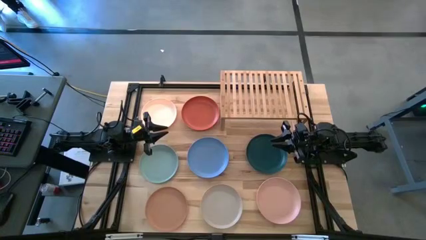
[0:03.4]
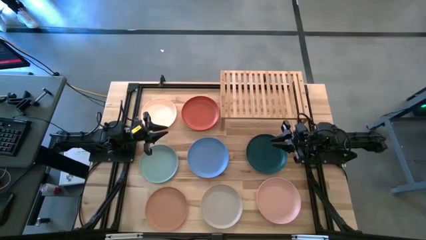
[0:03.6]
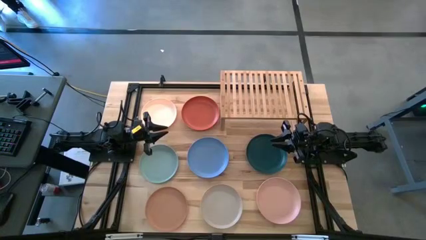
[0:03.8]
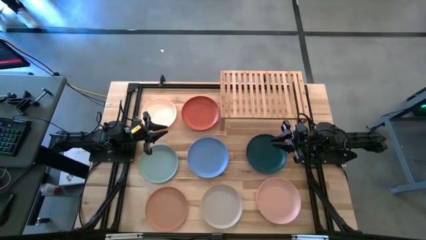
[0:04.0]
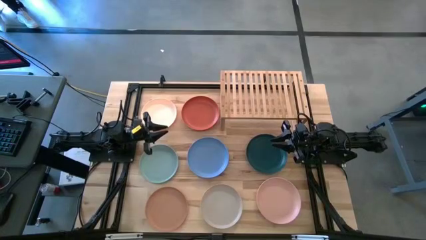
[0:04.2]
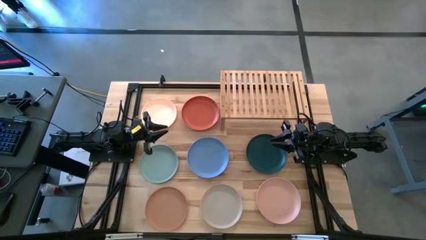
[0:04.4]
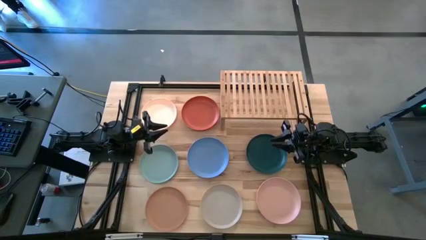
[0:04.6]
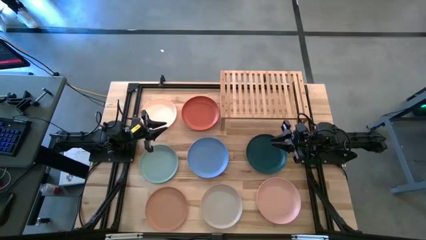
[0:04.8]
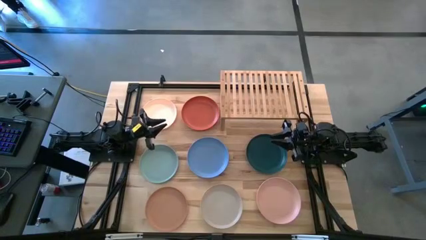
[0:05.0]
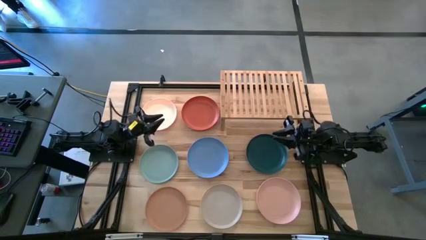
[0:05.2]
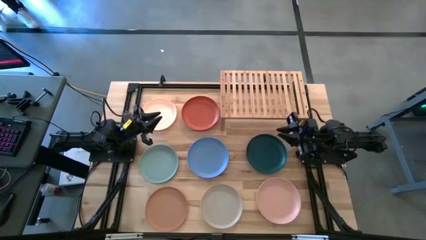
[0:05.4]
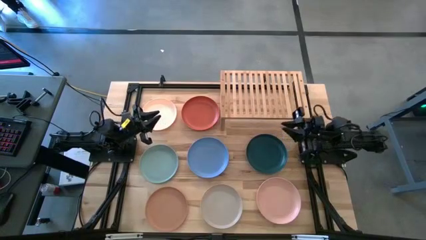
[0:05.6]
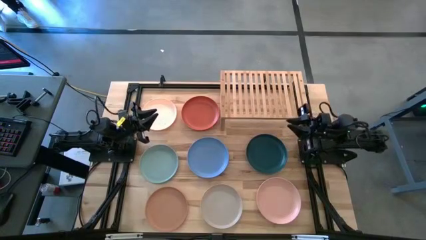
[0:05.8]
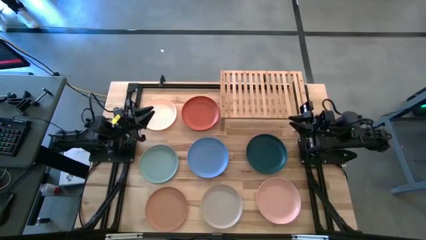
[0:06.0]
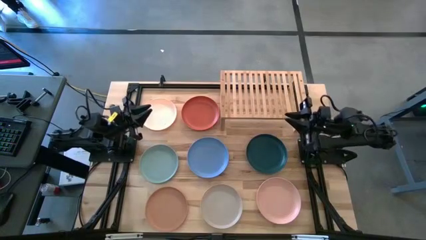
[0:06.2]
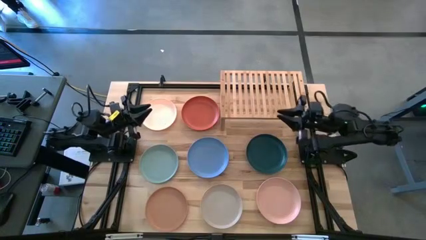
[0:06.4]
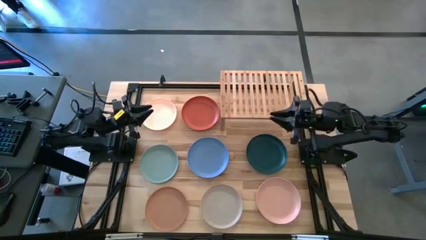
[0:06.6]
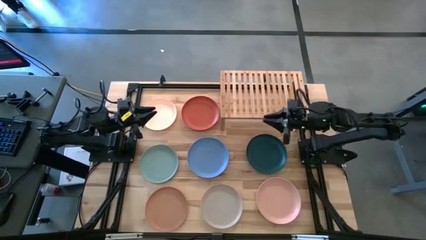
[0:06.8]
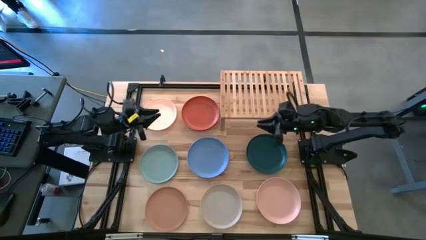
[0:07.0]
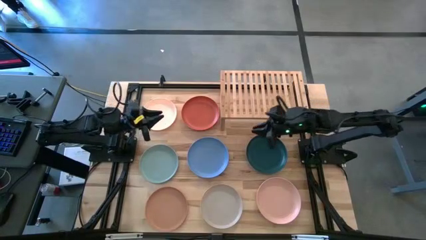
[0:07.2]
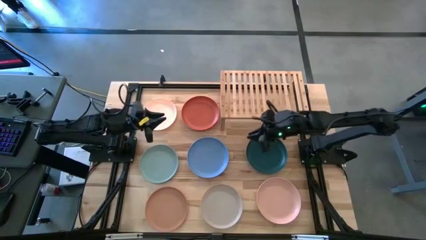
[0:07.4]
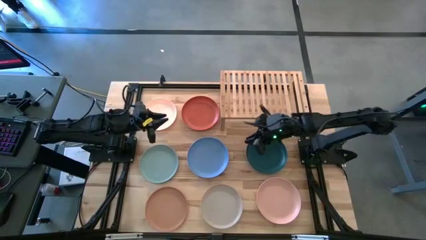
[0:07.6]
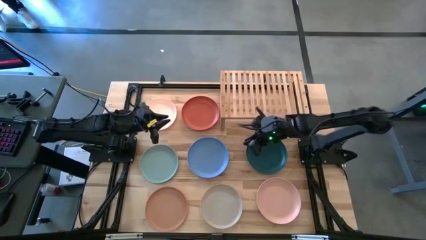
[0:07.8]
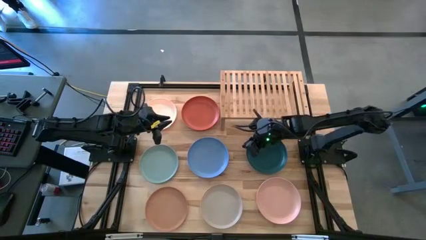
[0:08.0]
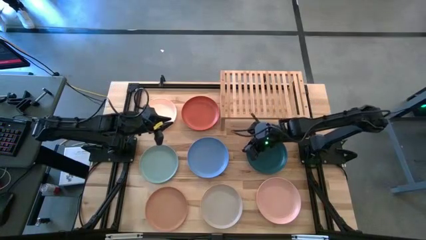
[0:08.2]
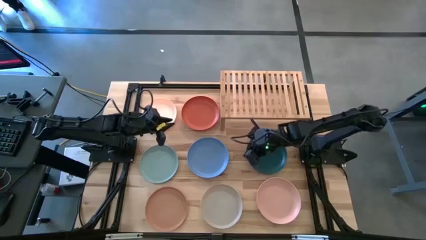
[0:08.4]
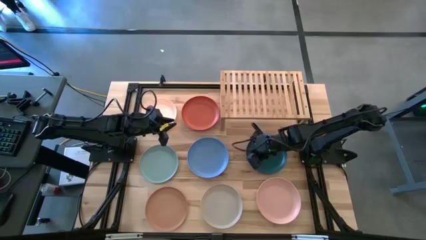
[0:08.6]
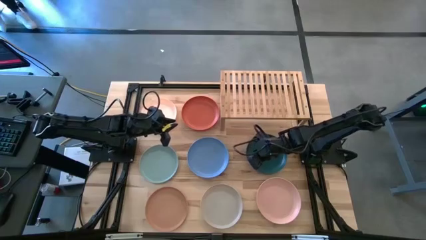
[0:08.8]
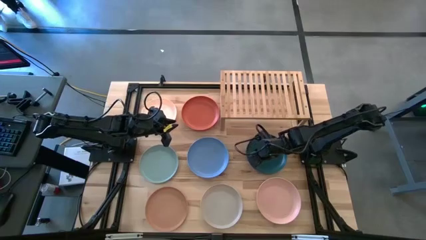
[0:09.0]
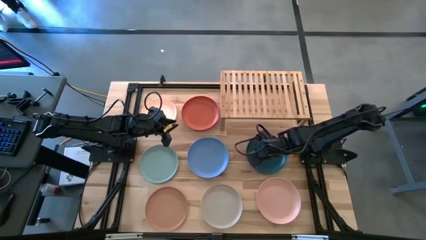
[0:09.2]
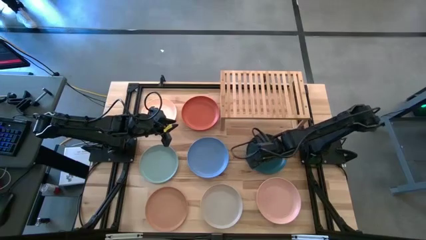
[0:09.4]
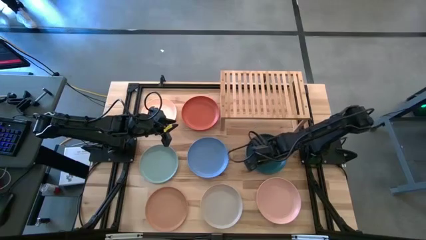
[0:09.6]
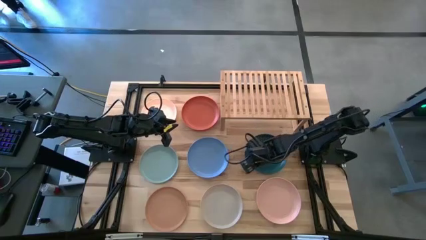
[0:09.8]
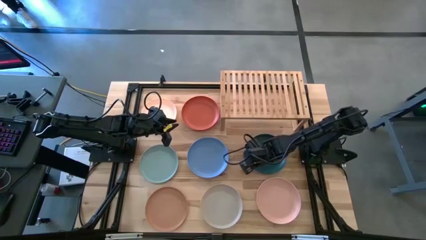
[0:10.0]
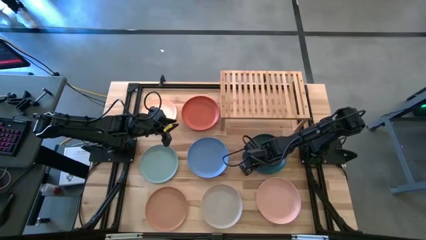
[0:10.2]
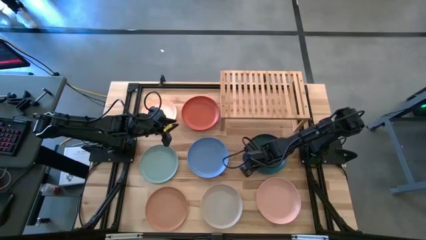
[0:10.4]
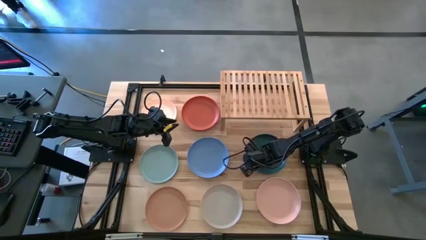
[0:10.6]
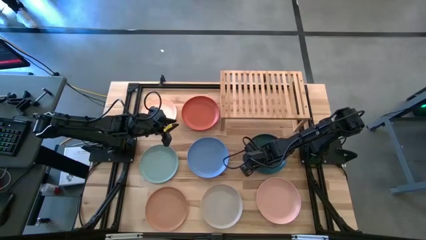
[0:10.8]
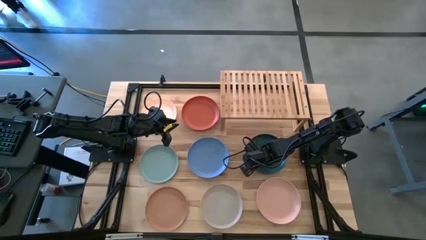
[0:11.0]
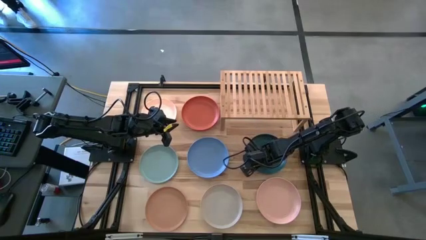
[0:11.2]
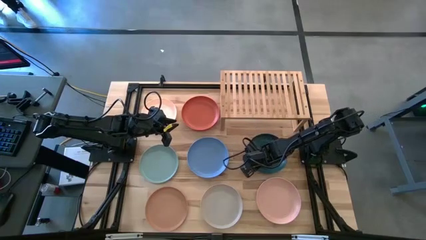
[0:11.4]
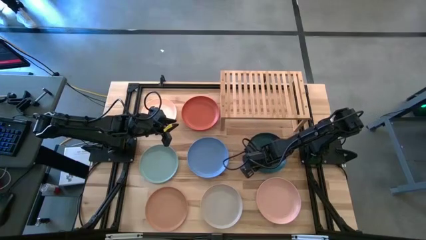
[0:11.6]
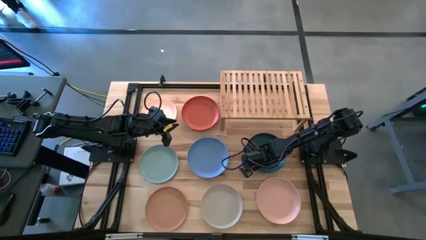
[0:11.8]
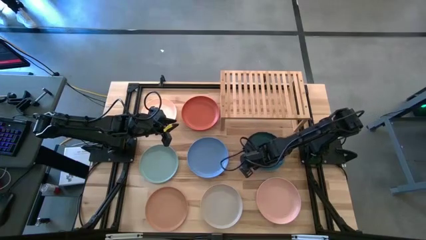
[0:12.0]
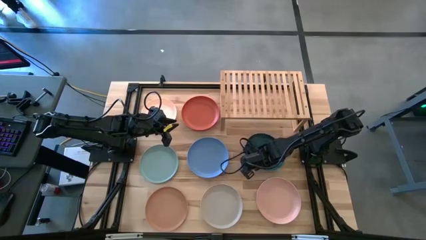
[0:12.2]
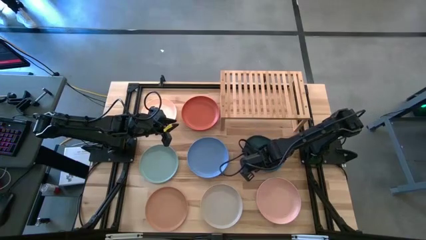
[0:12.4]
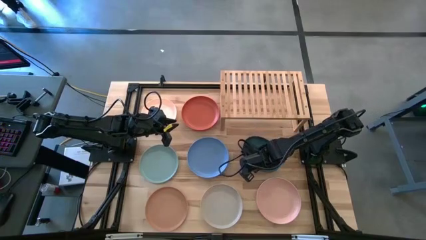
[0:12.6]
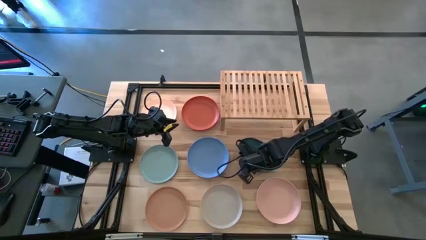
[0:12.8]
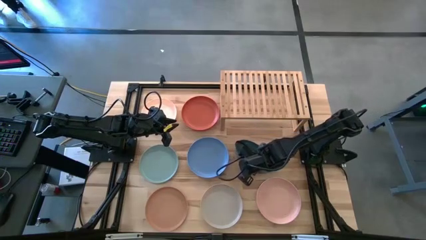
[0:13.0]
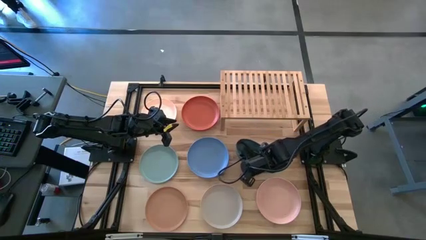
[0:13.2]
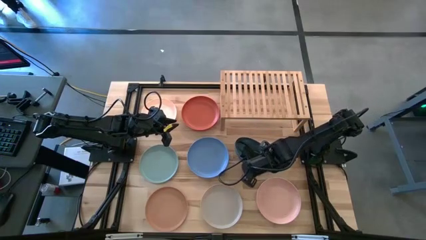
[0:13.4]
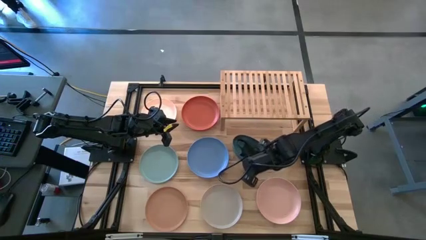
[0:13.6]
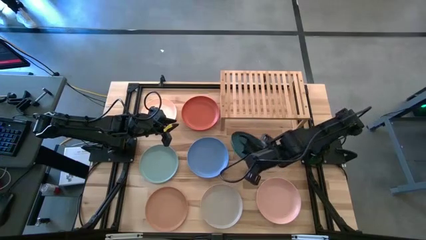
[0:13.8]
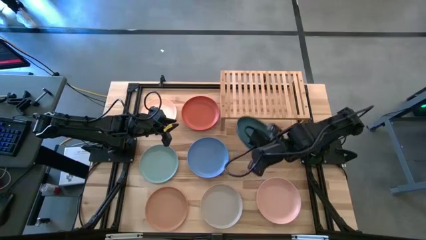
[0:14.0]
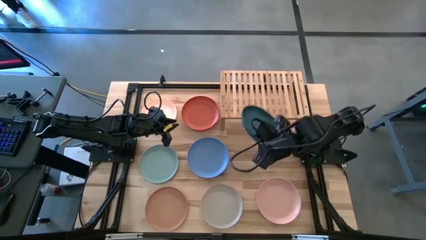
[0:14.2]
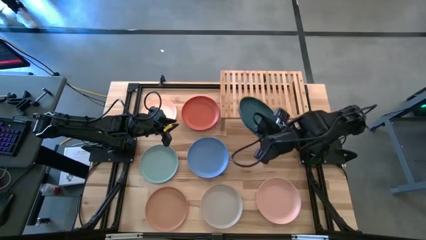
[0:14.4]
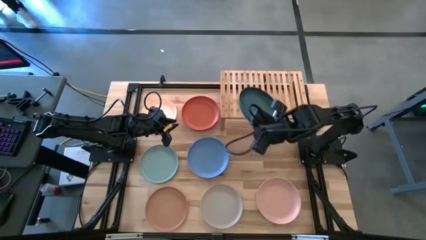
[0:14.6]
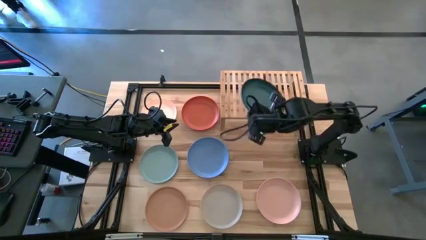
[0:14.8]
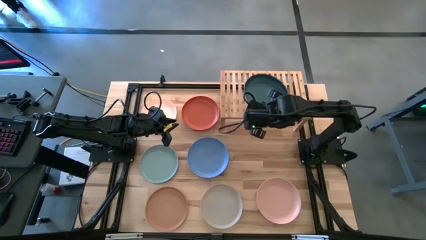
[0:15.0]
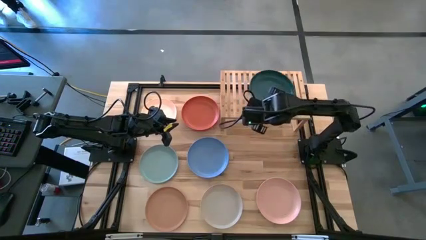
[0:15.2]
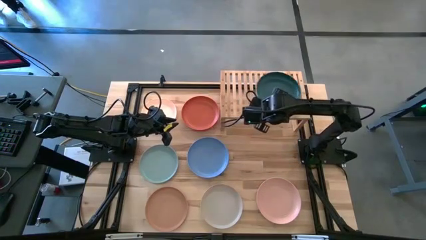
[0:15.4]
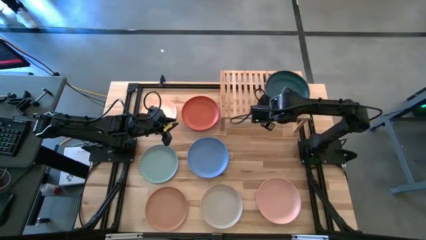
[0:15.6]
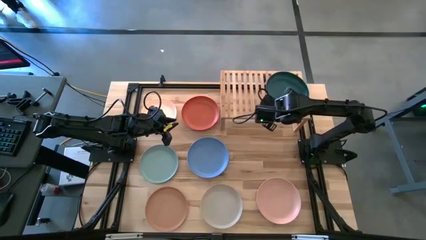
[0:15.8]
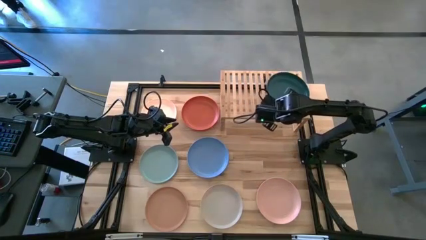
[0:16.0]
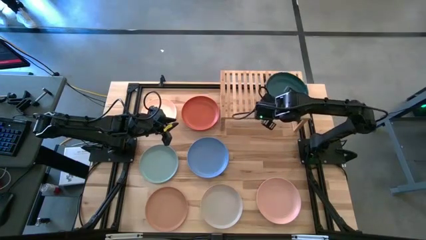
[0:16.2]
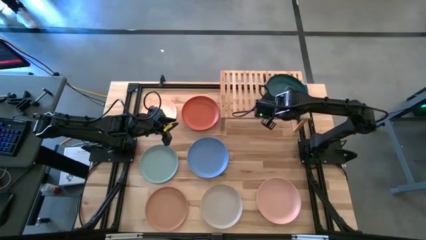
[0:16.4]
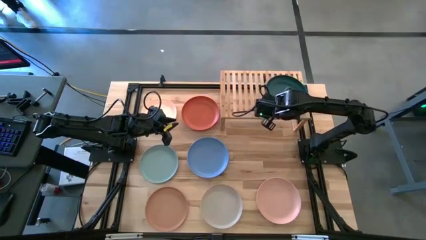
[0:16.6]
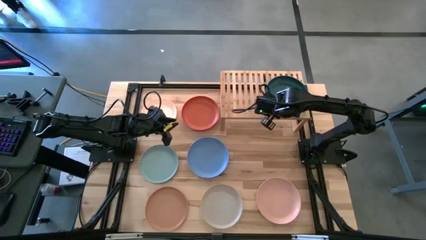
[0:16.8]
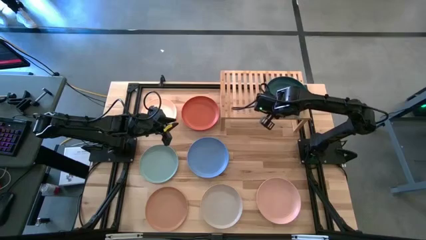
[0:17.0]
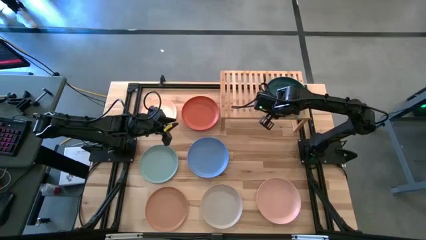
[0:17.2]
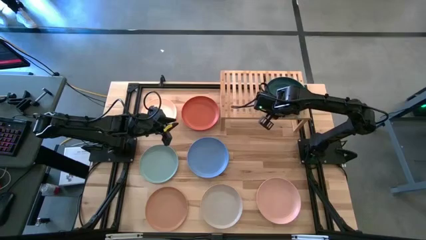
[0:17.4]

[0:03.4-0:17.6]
Task: Place and stack plates onto a shelf
Put the green plate on the shelf
